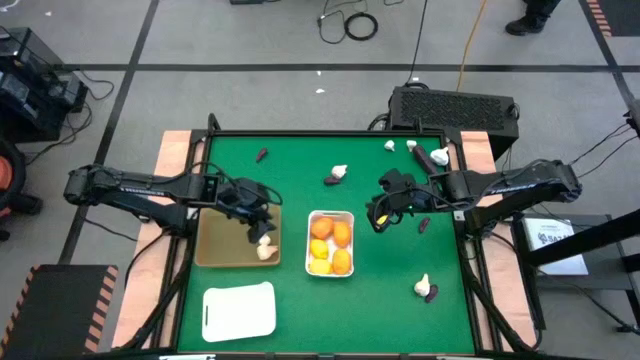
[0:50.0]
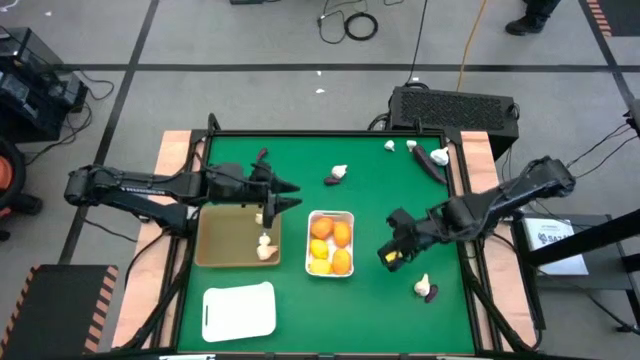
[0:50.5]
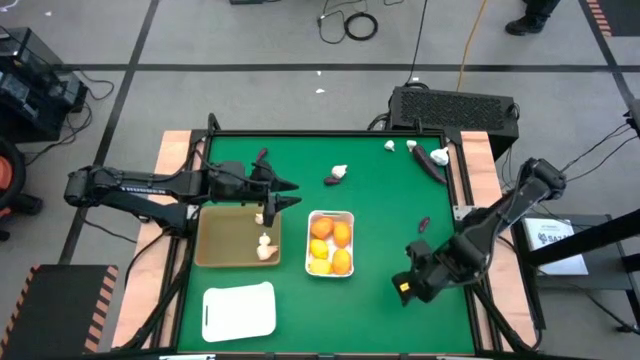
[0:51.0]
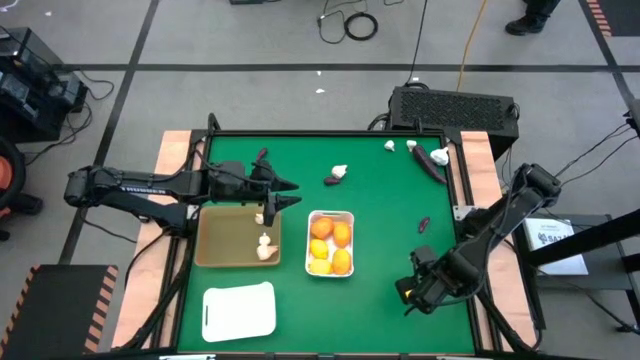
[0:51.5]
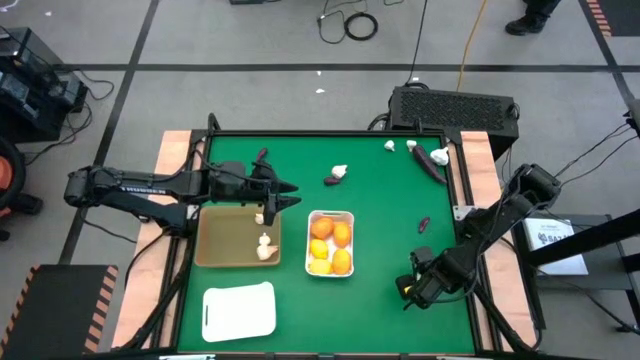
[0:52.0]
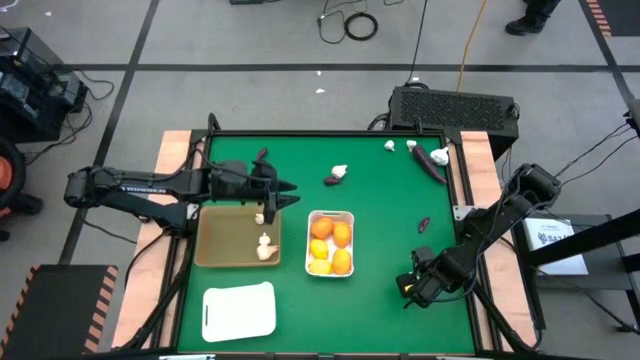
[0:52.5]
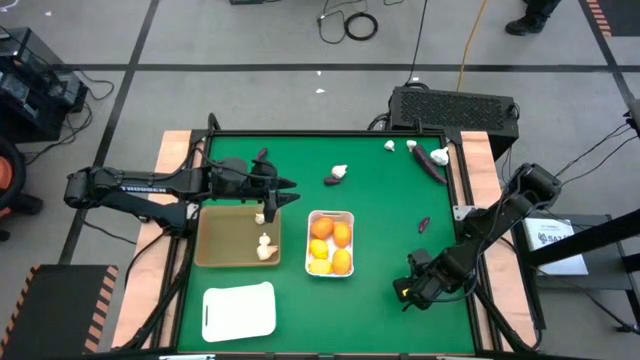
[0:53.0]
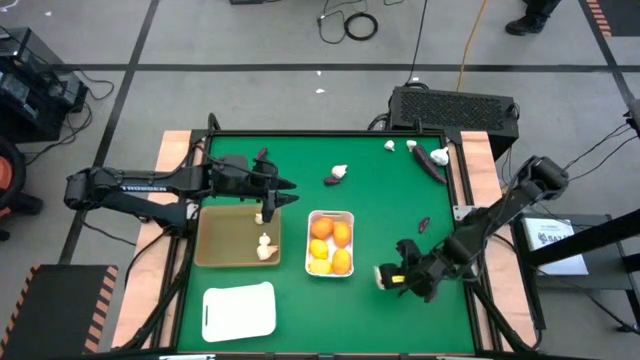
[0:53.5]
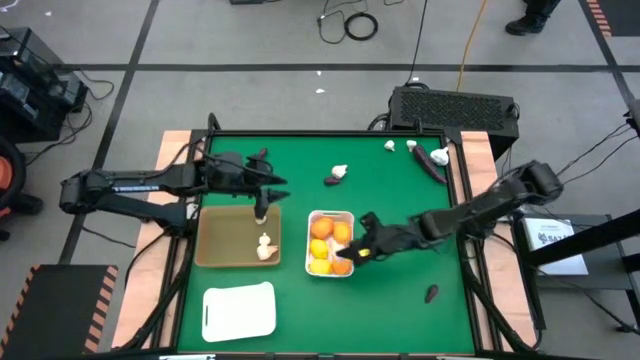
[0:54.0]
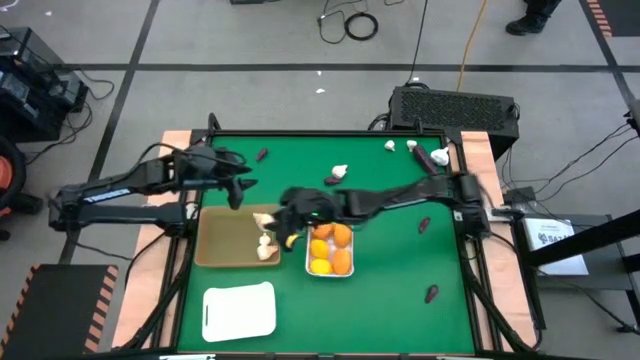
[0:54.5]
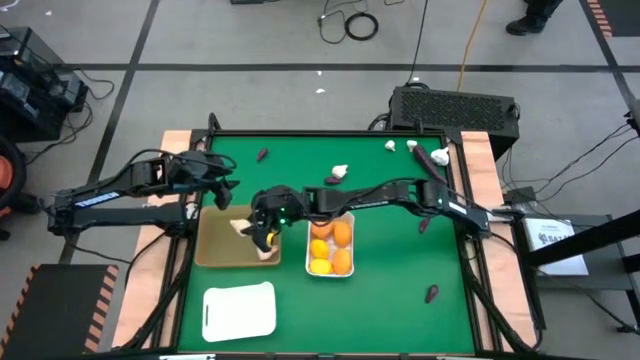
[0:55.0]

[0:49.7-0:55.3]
Task: Sort produce into baskets
Put the white garlic into the orange bin

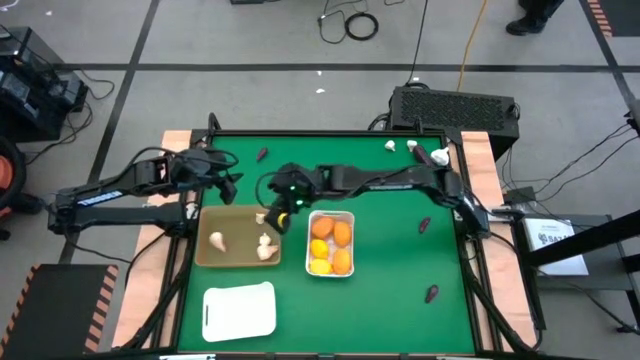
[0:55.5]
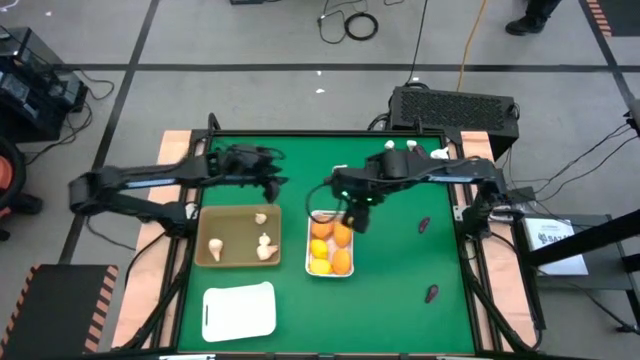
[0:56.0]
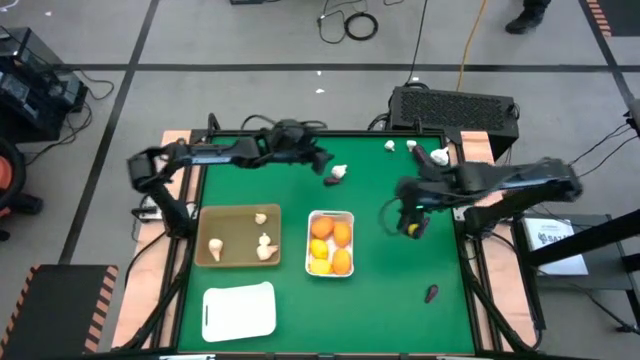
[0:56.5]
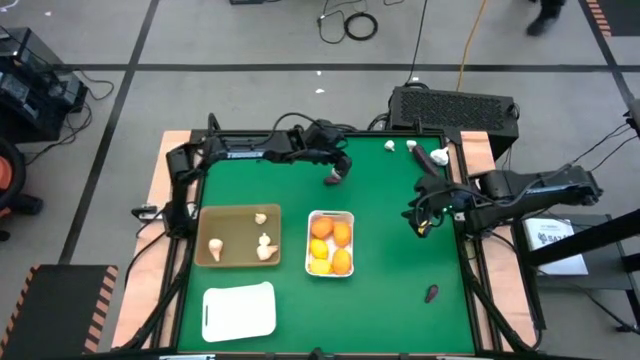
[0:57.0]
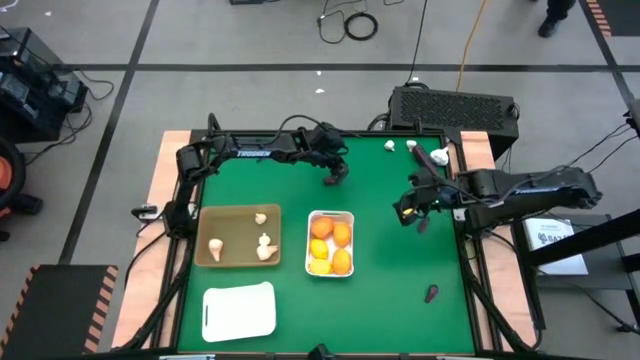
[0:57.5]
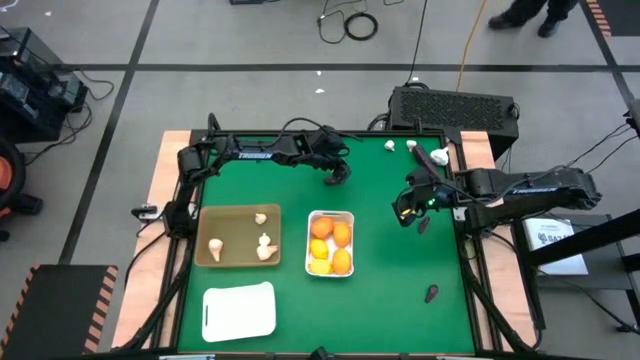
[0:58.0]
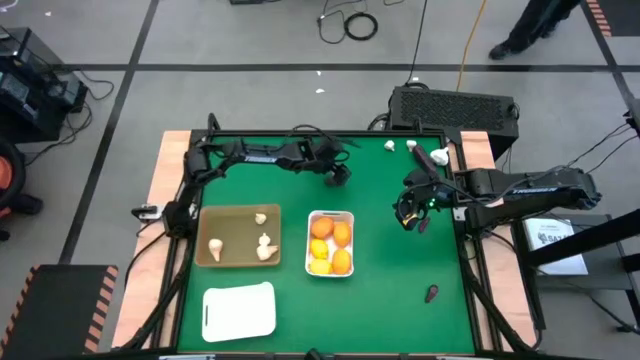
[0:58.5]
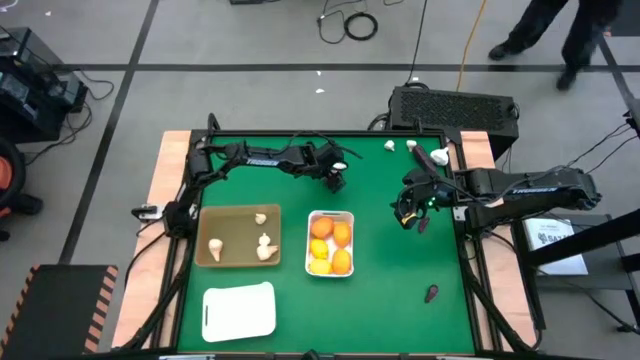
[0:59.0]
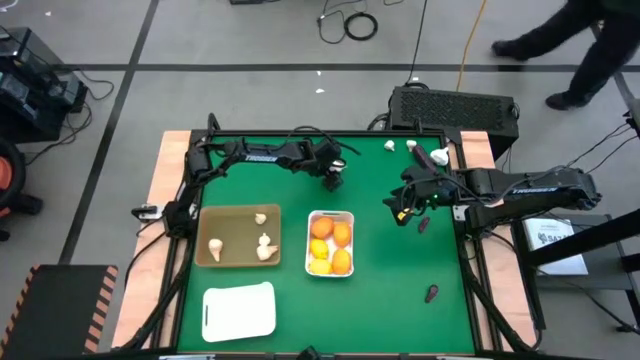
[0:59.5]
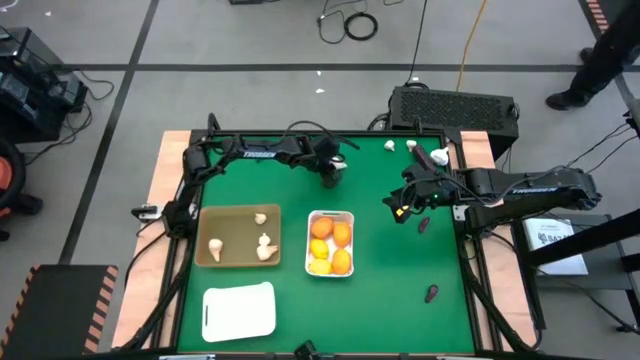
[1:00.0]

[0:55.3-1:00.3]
Put the white garlic into the orange bin

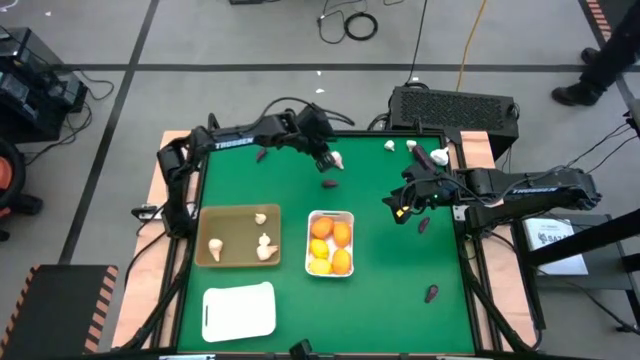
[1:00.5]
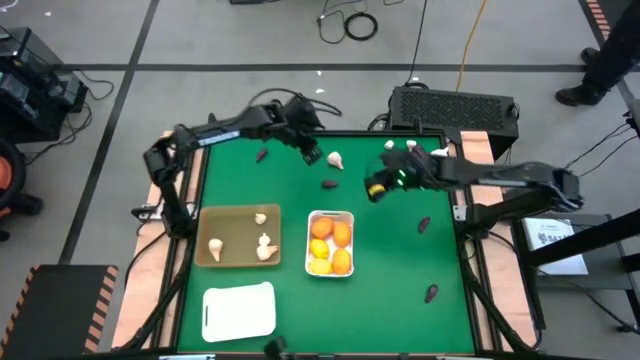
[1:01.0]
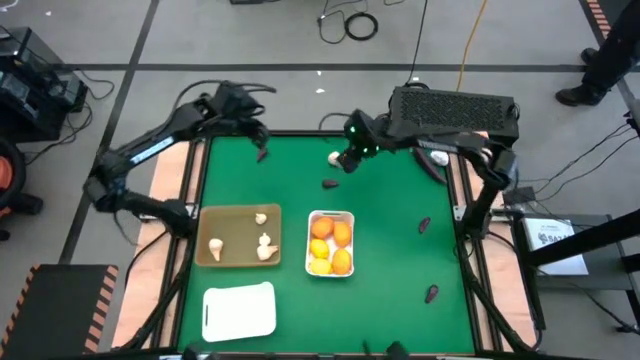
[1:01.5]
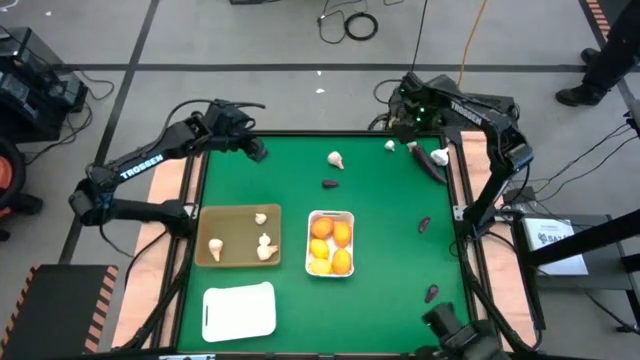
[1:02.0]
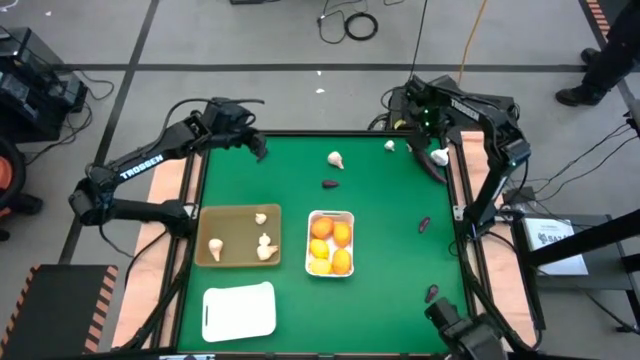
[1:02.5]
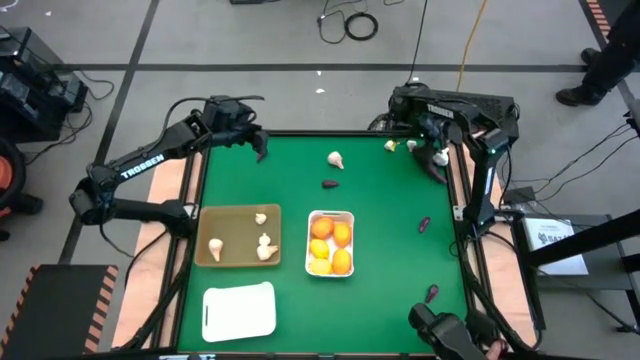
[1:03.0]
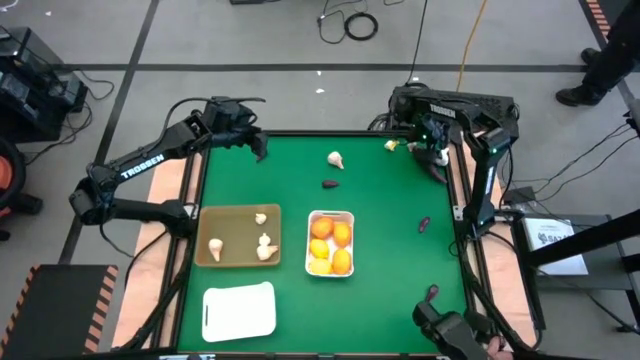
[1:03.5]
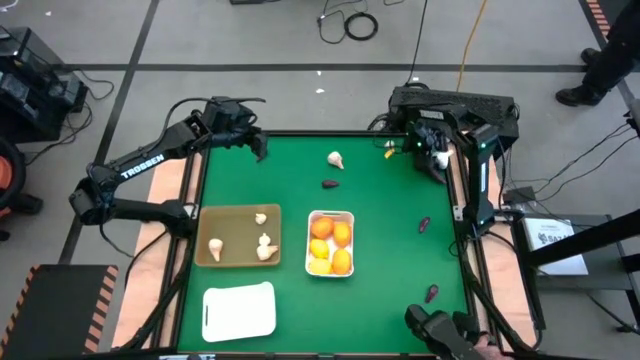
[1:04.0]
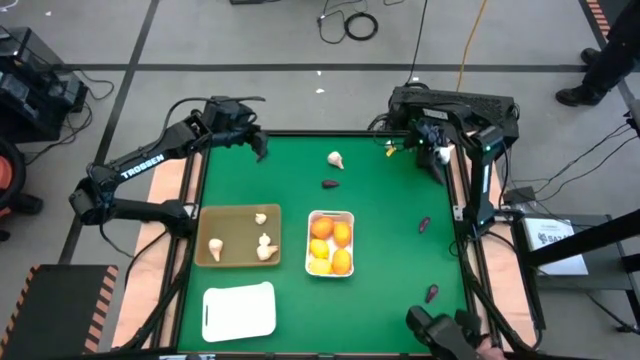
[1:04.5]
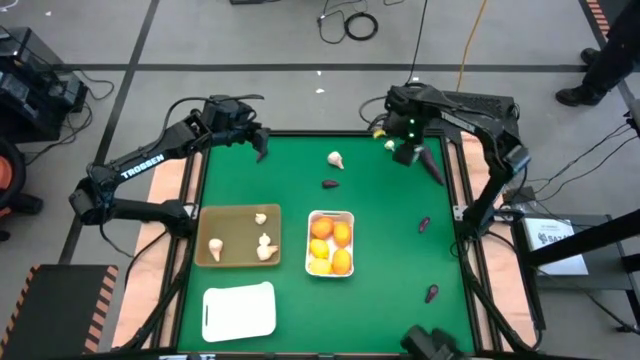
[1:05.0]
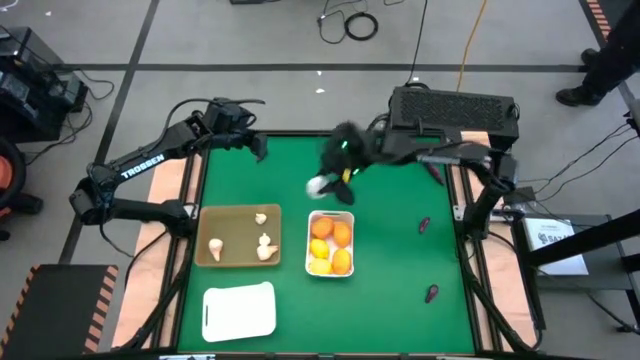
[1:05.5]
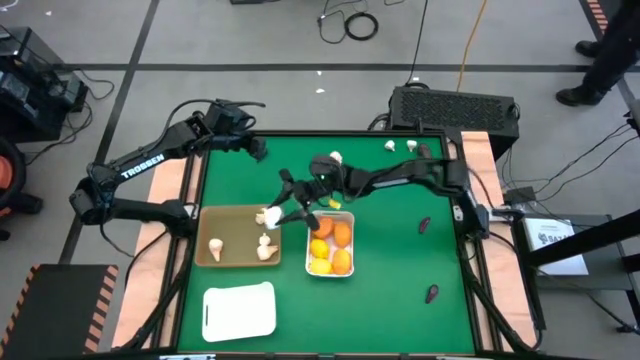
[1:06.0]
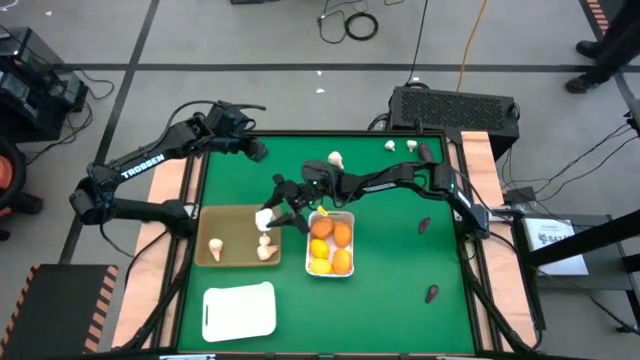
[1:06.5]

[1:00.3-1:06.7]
Put the white garlic into the orange bin

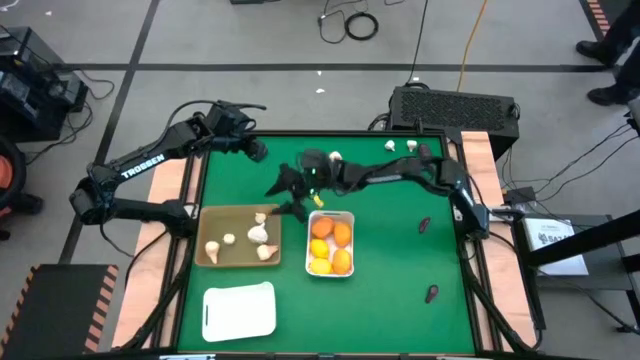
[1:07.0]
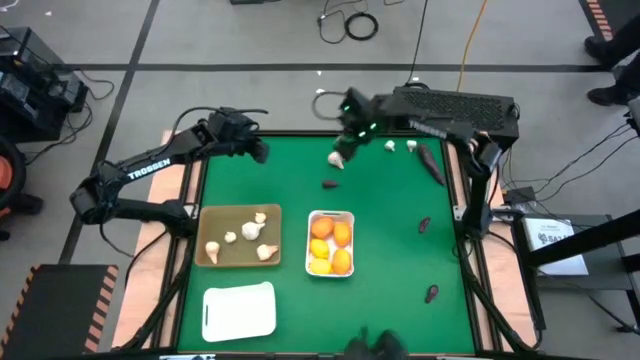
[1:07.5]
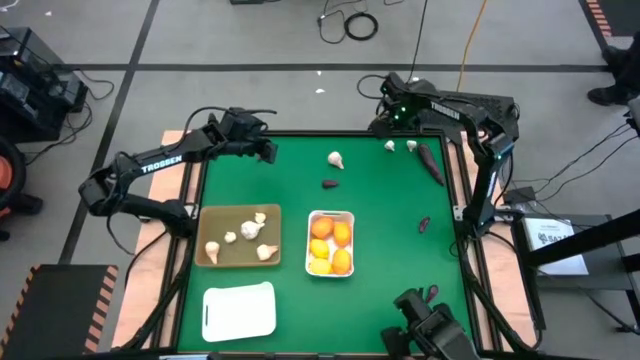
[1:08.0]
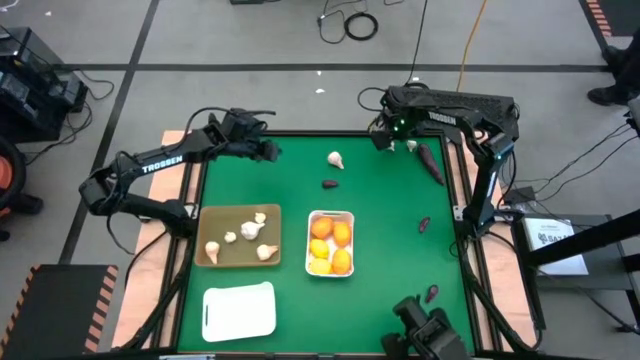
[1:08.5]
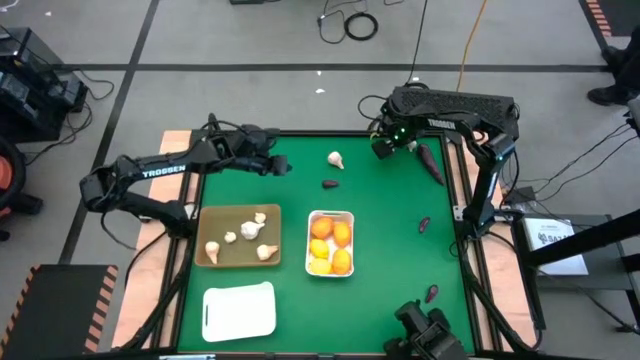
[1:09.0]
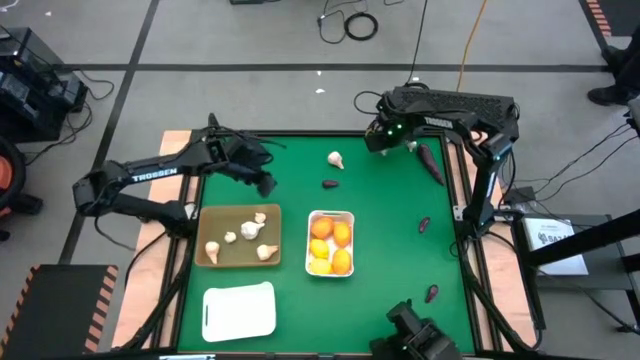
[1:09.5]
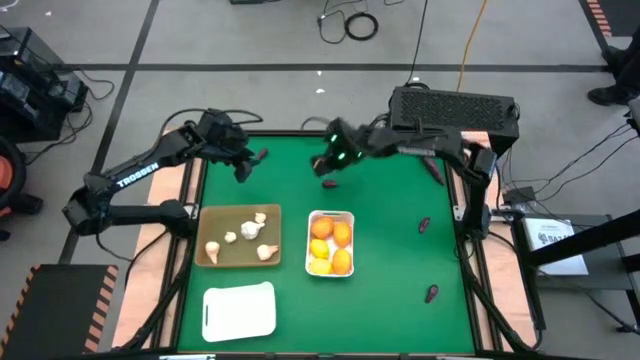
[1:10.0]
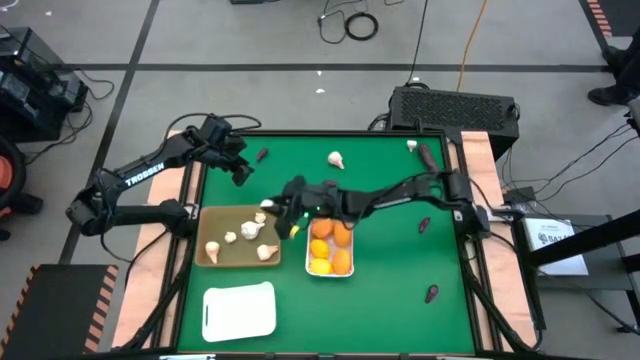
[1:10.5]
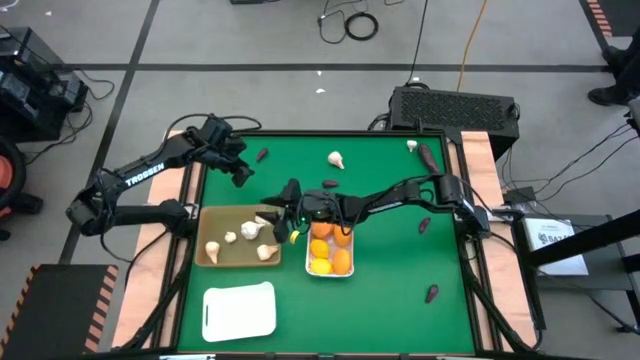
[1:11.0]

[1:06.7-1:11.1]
Put the white garlic into the orange bin

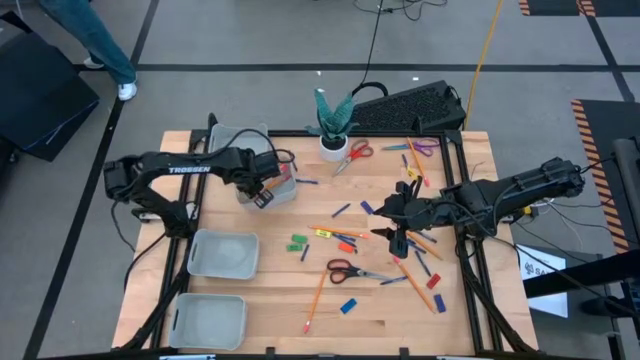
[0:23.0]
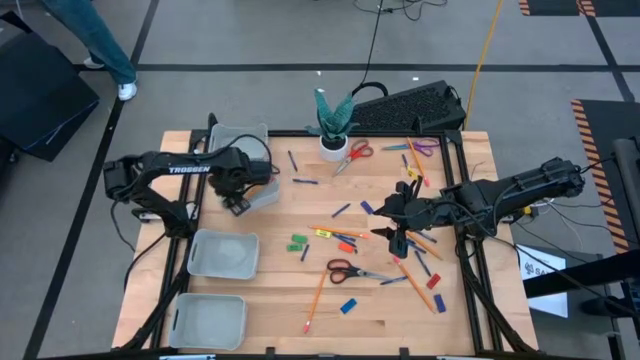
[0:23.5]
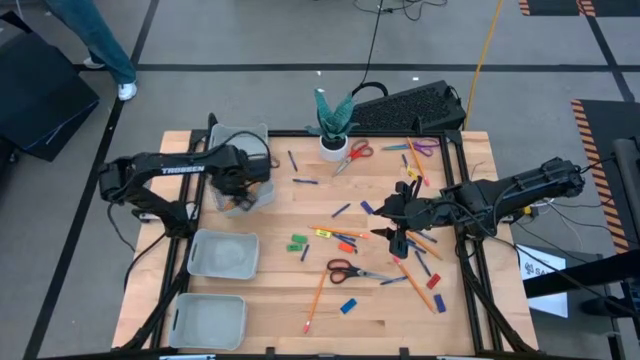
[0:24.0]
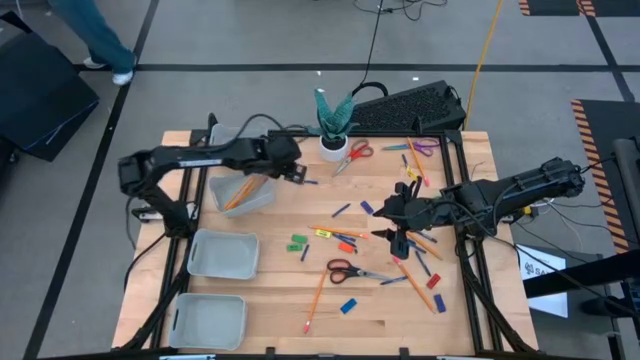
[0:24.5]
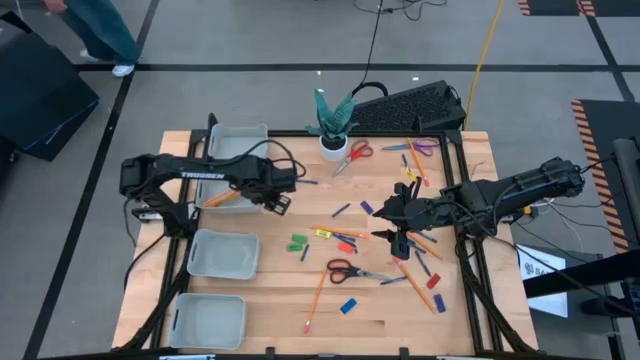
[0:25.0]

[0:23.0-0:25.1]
Task: Sort crayons/erasers/pens/pencils in bins
Adjust the middle top bin
